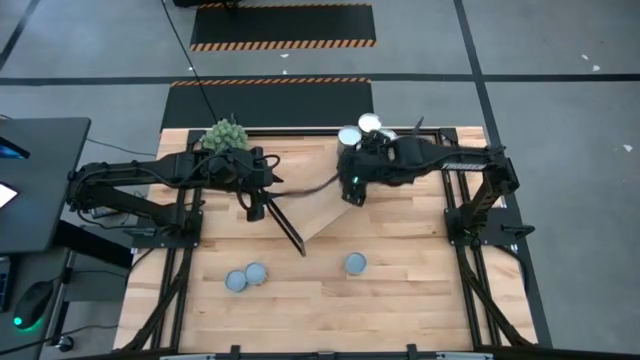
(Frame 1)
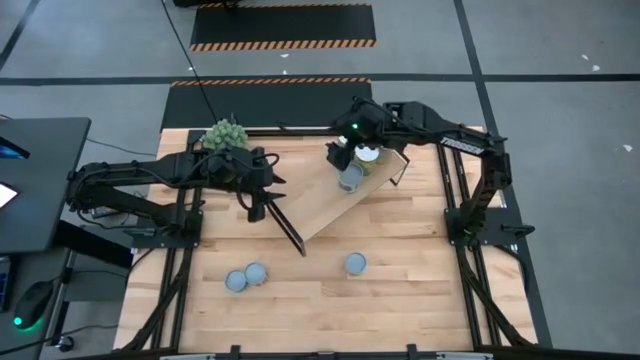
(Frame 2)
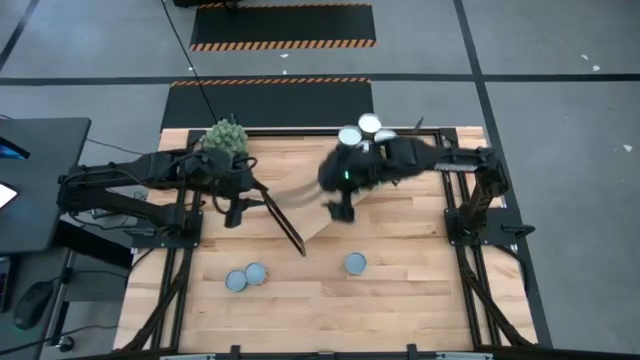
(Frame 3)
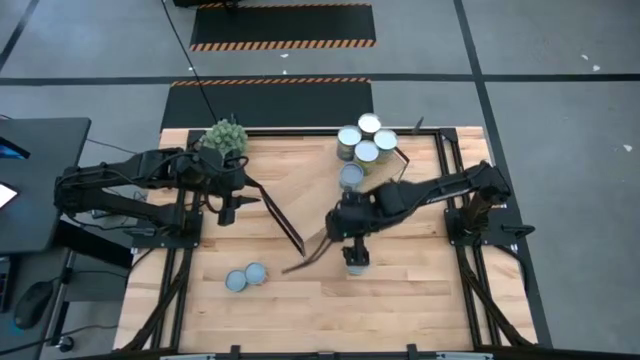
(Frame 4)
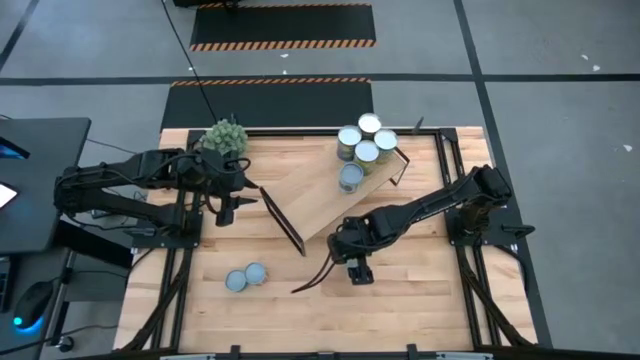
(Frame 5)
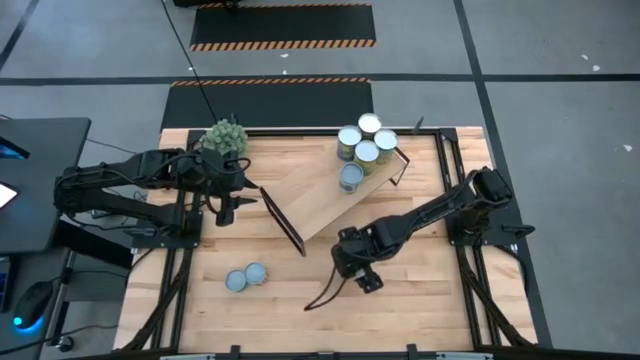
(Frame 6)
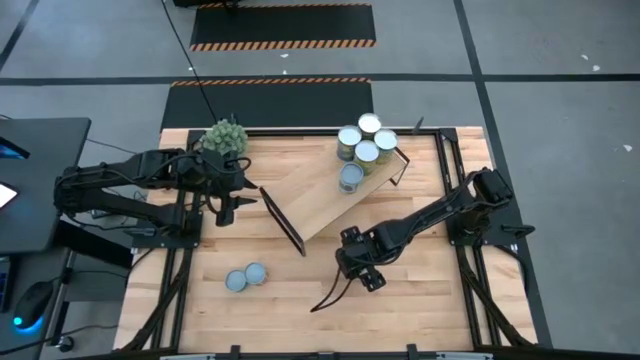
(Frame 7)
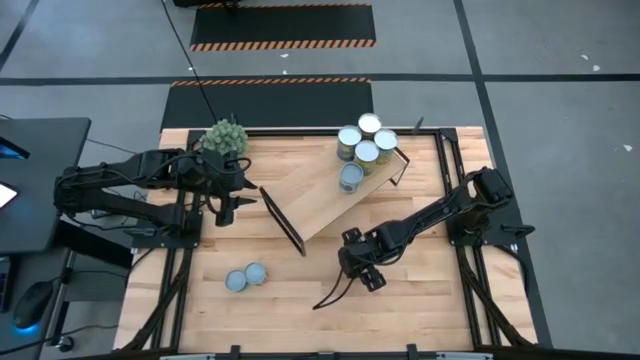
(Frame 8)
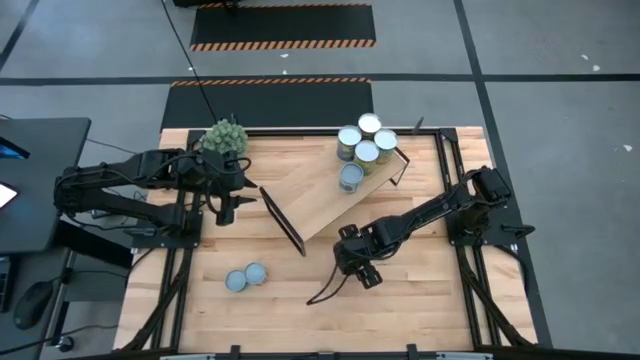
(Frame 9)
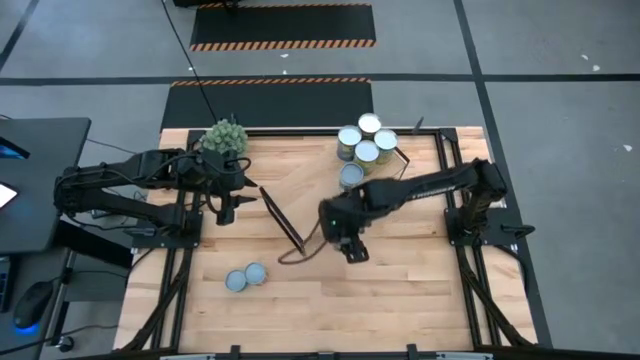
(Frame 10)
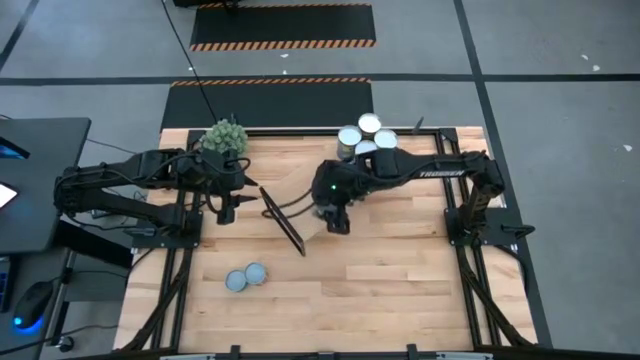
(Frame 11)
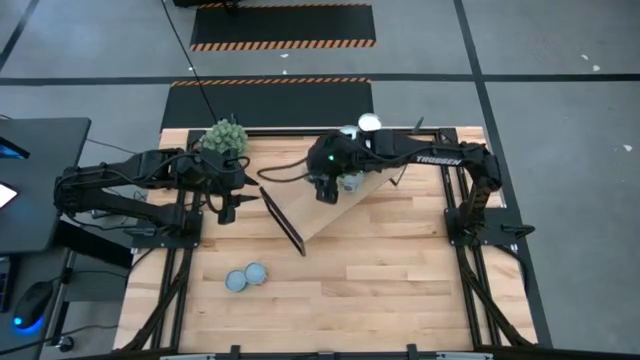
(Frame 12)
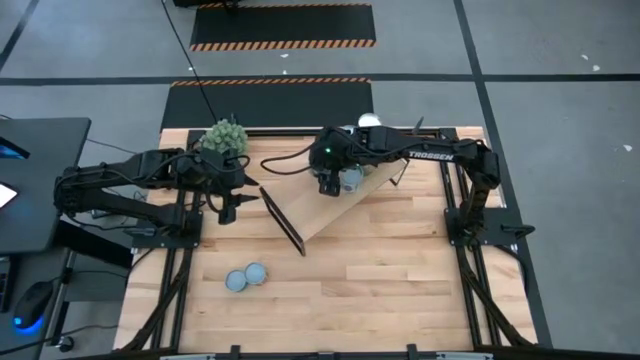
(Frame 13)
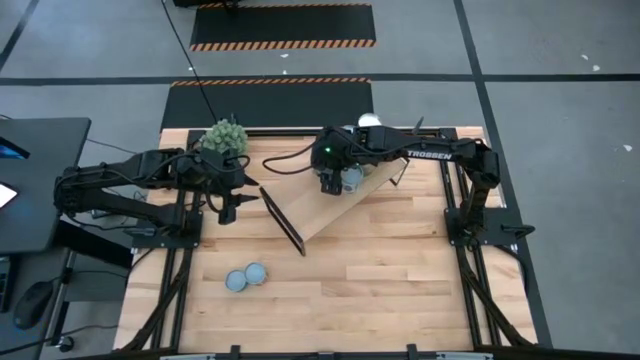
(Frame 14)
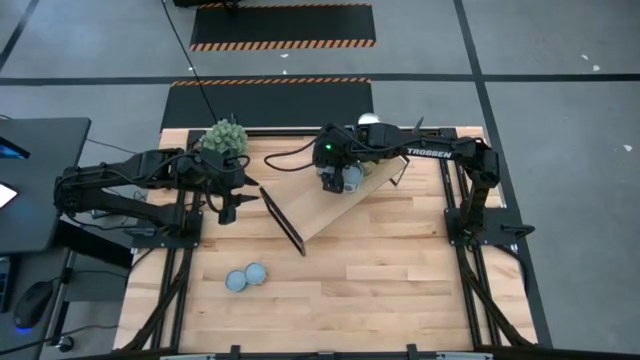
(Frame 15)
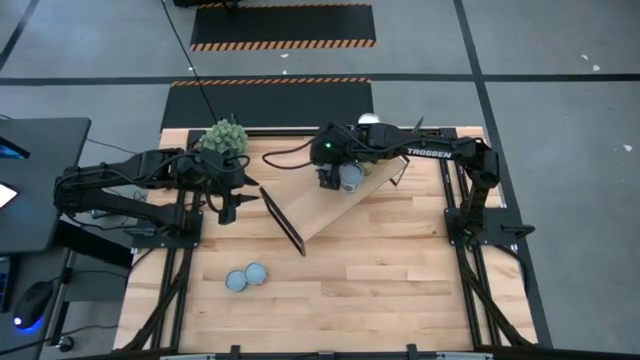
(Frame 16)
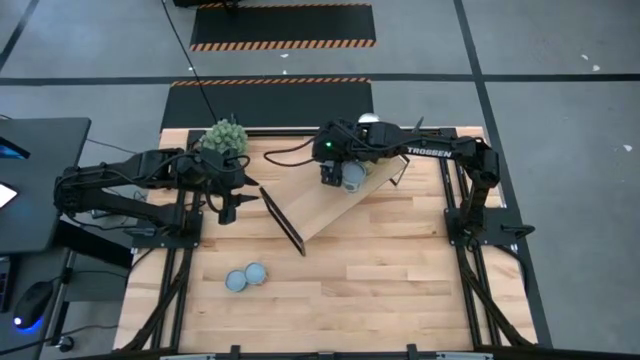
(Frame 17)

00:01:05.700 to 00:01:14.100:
Task: Pick and place cans onto a shelf
Put the green can on the shelf

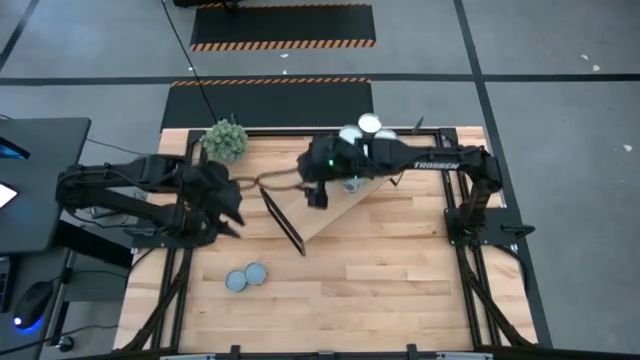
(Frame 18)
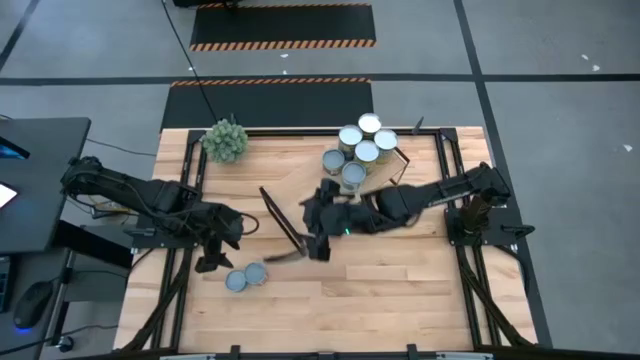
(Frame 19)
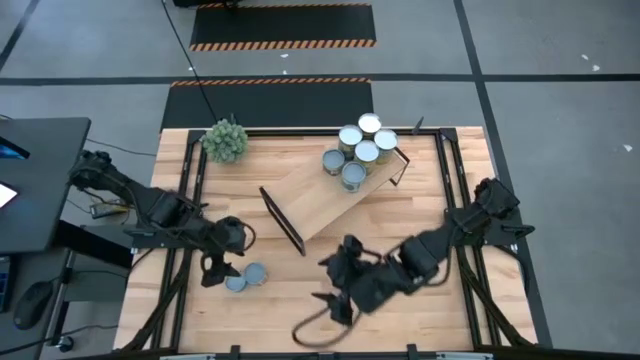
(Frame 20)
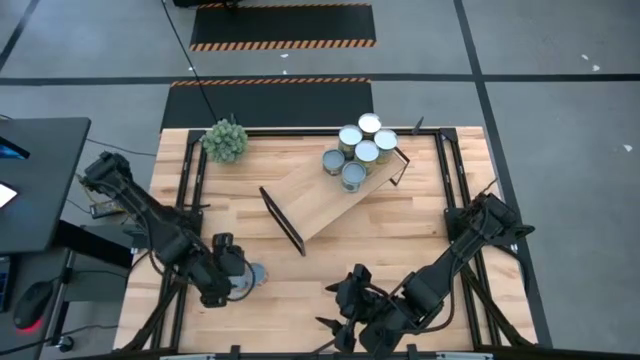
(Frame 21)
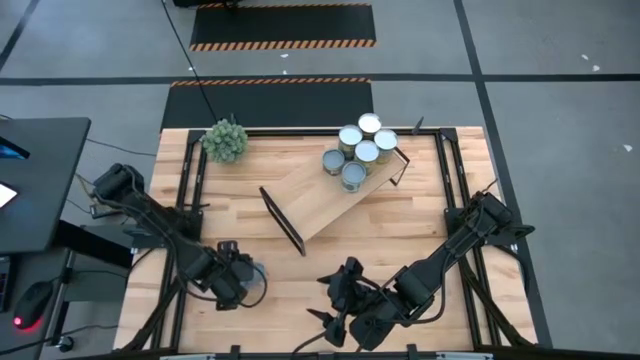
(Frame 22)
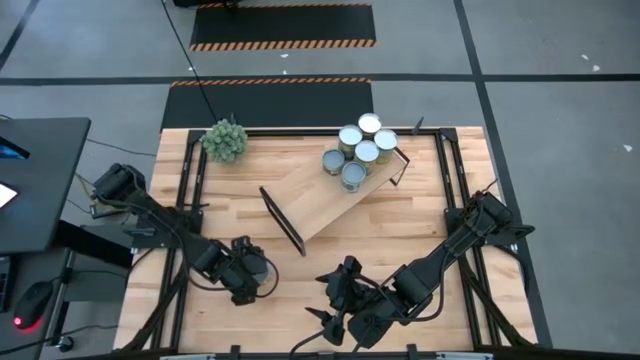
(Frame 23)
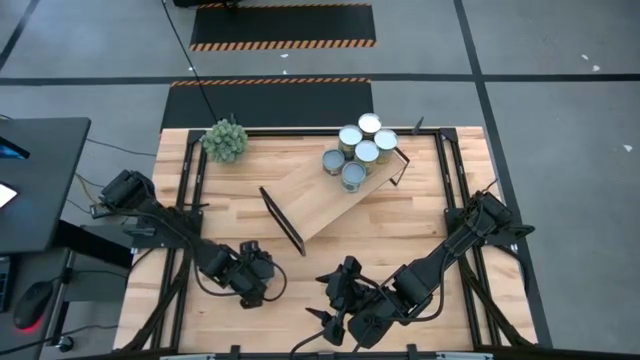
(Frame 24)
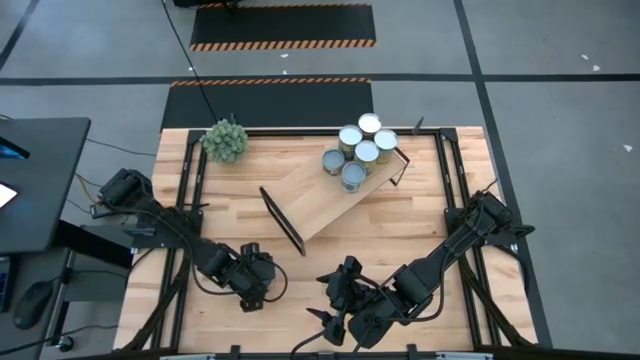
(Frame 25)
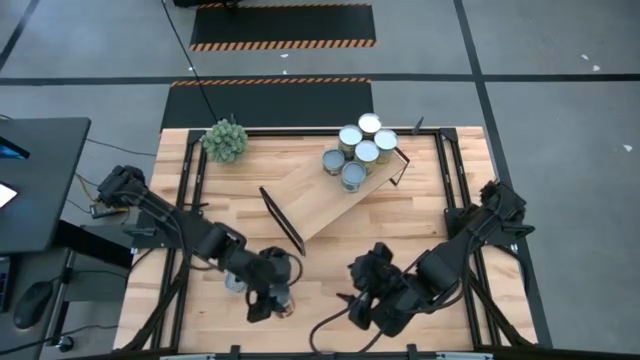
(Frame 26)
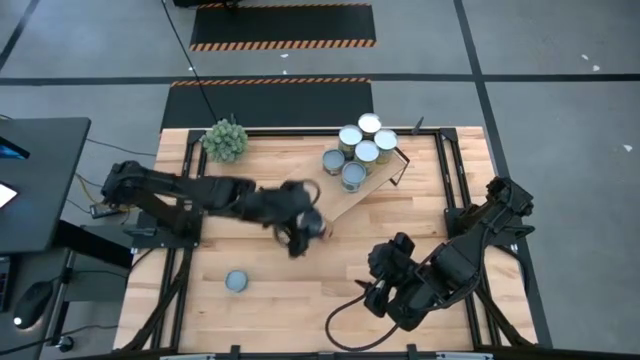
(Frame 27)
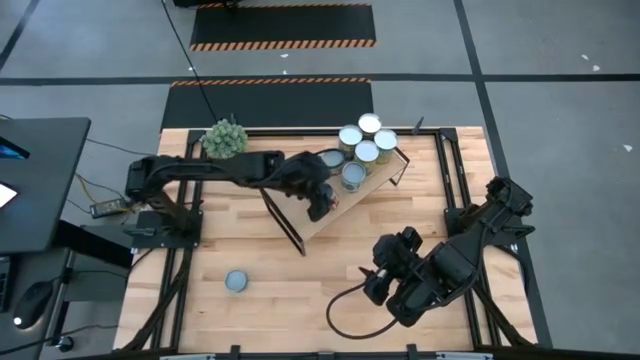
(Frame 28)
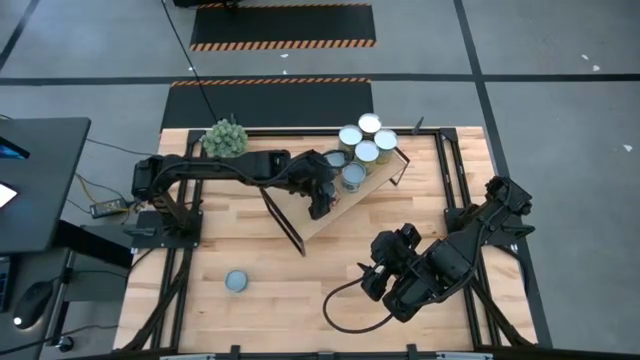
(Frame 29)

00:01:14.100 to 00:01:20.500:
Put the canned tomatoes on the shelf

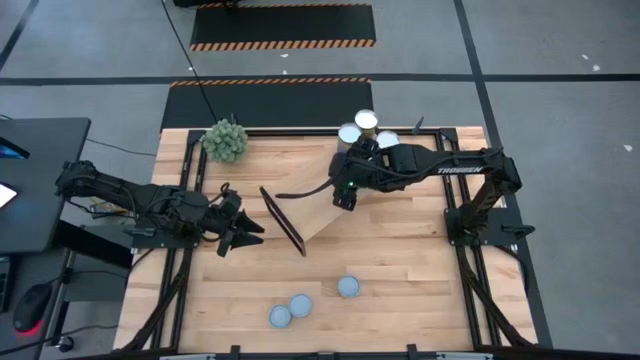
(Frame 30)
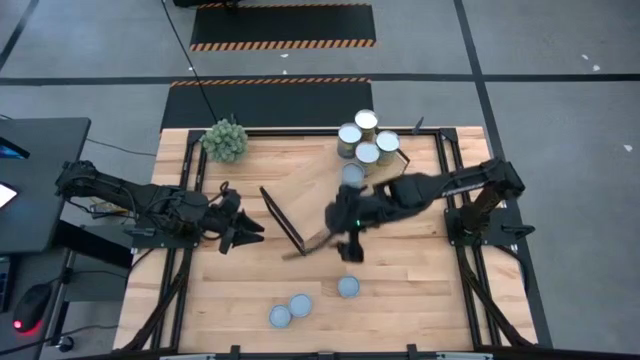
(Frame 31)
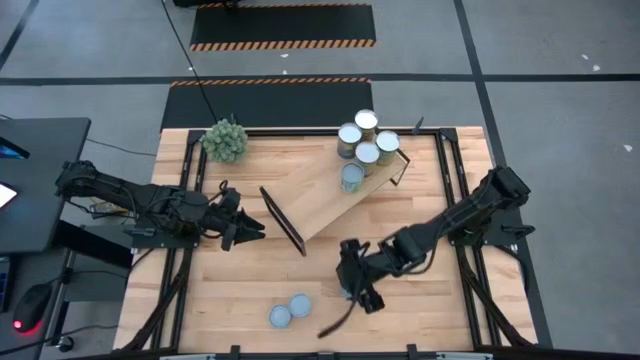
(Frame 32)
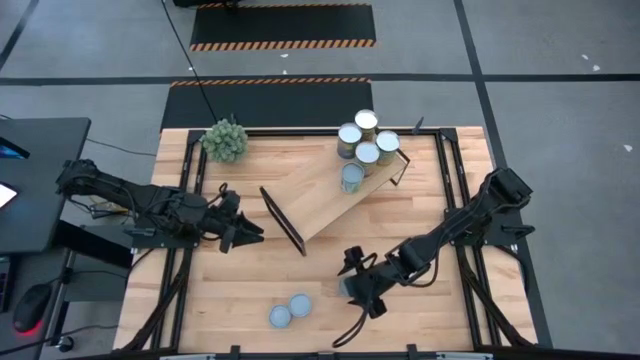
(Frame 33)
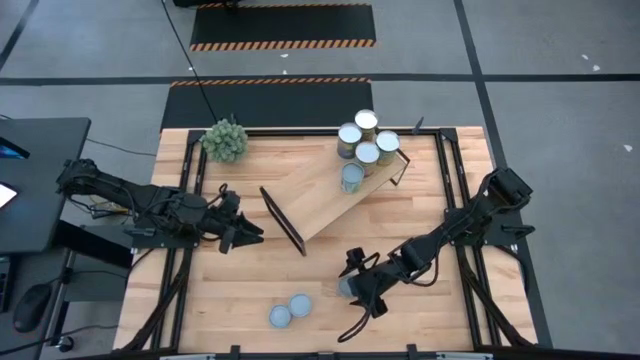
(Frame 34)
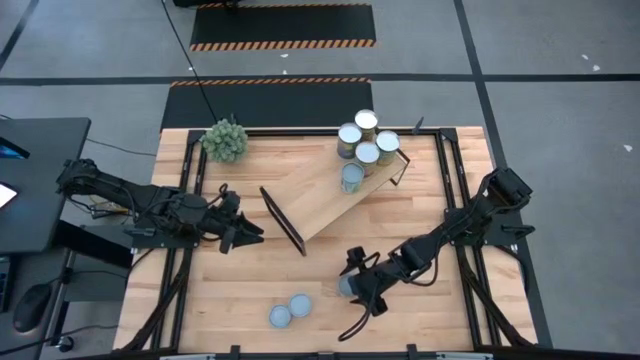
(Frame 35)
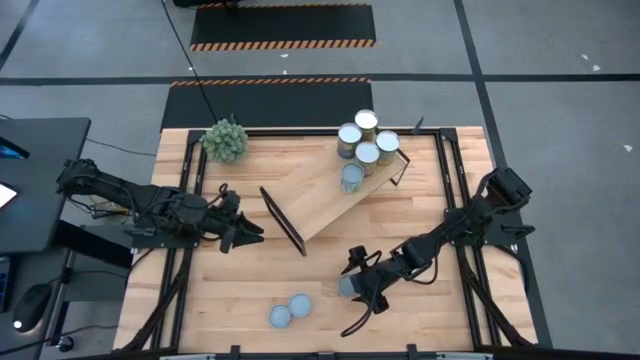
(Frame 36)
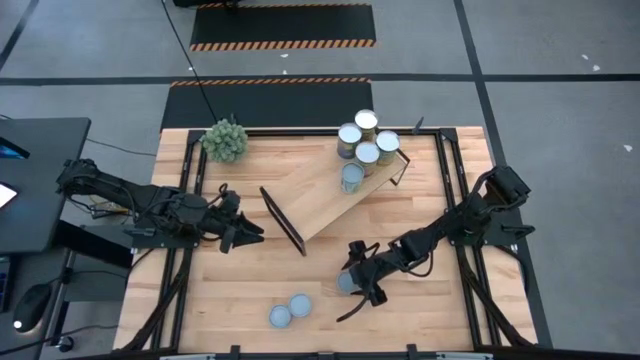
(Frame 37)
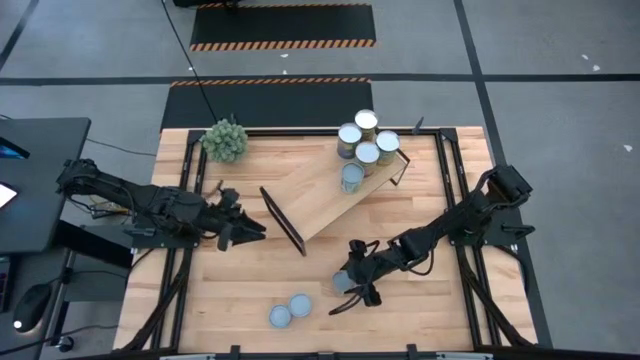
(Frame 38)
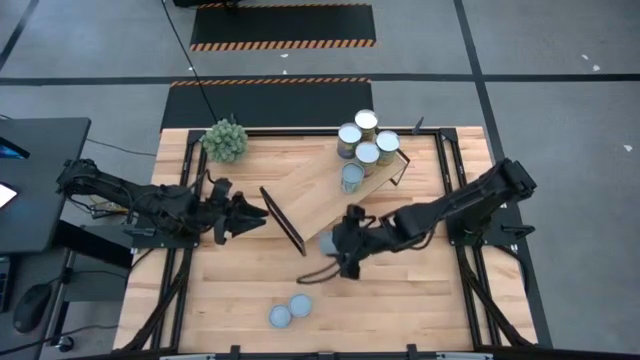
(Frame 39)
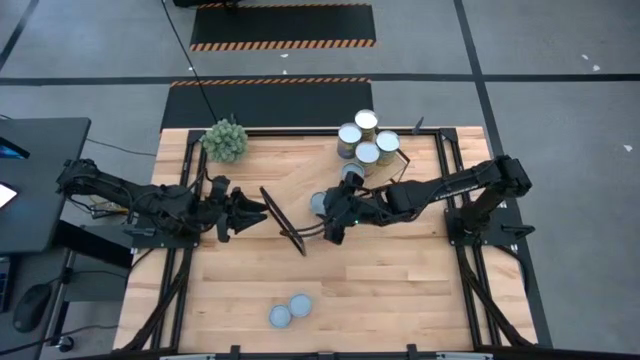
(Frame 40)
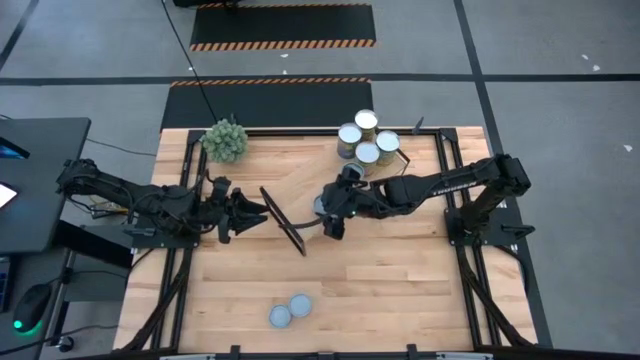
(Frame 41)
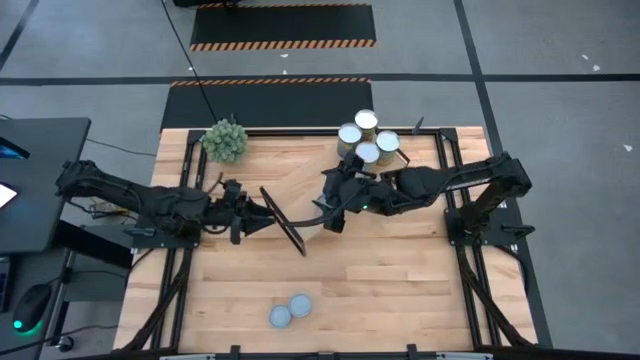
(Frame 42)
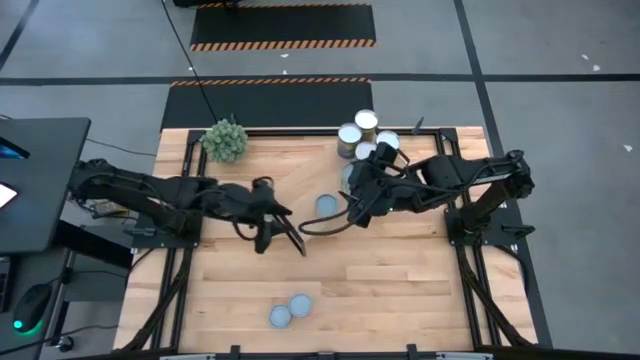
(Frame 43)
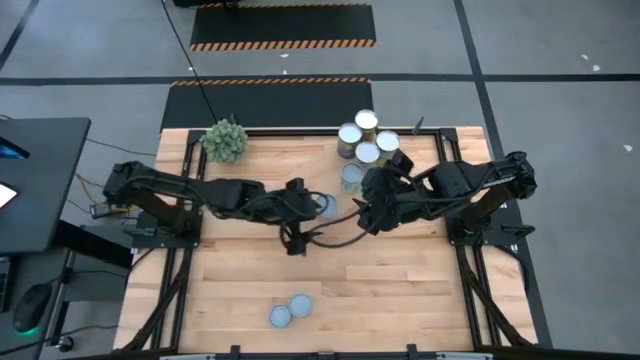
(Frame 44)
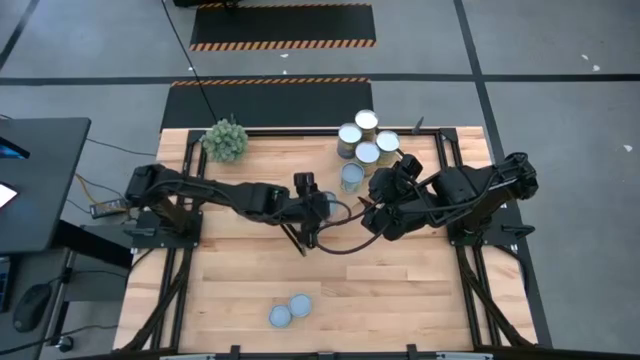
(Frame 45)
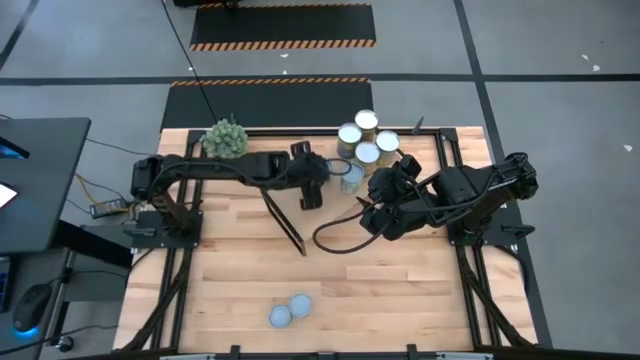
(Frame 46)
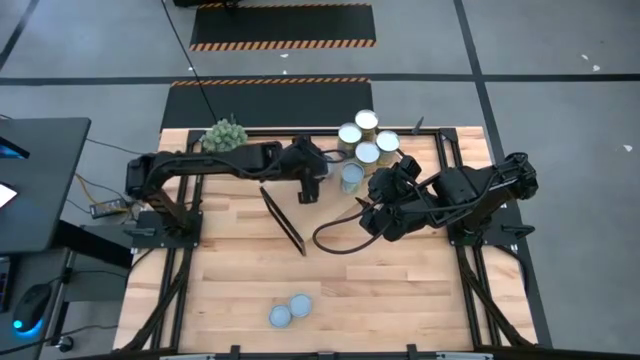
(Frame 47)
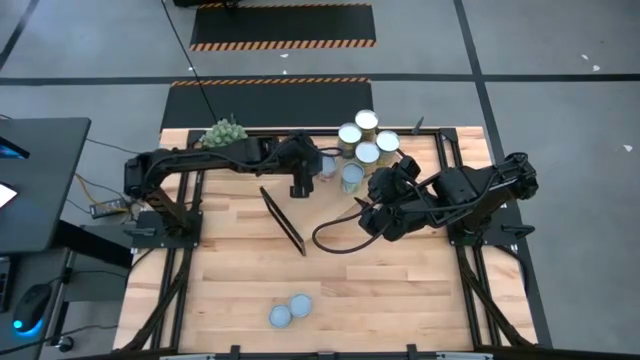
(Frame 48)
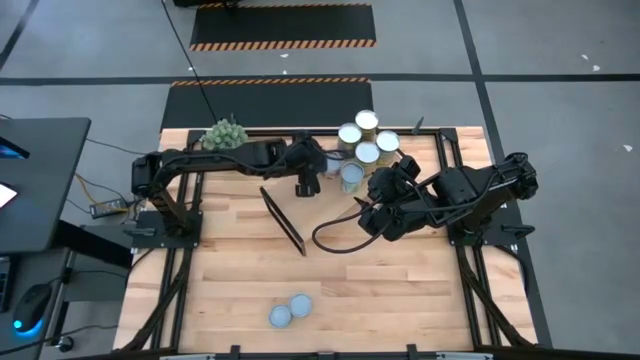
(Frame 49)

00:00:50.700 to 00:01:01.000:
Task: Pick and place cans onto a shelf
Put the canned tomato on the shelf
